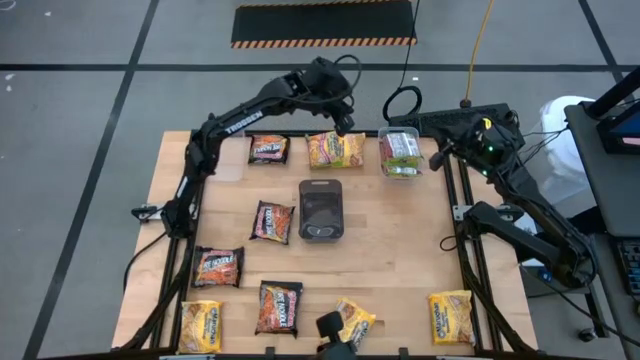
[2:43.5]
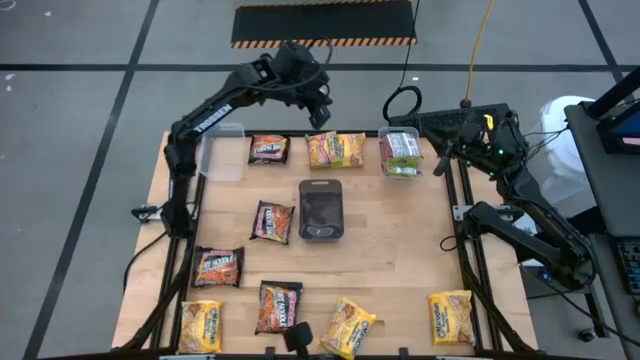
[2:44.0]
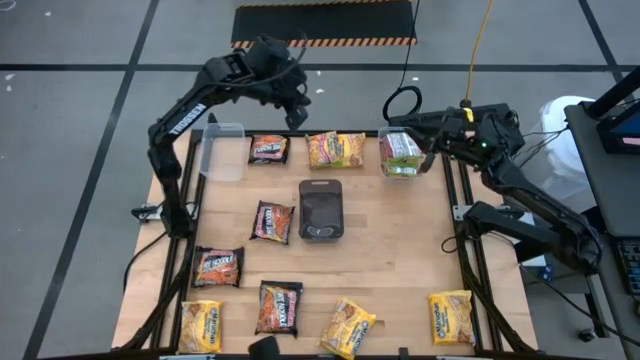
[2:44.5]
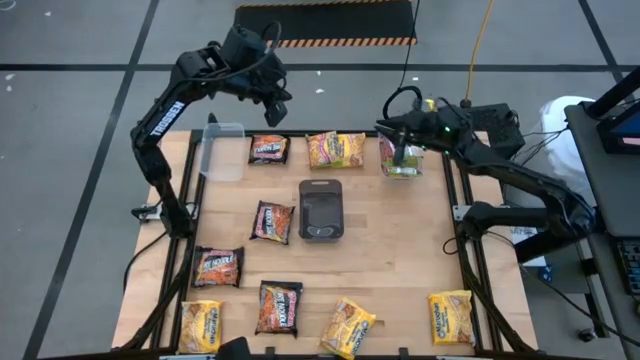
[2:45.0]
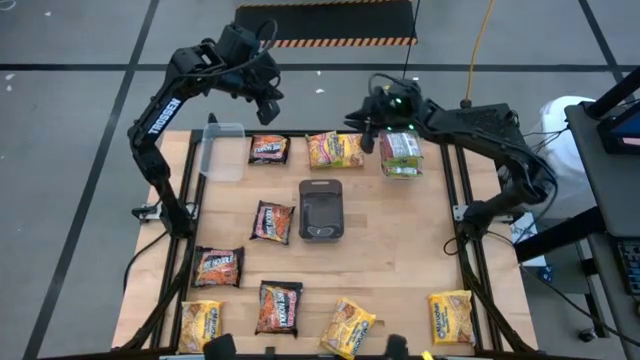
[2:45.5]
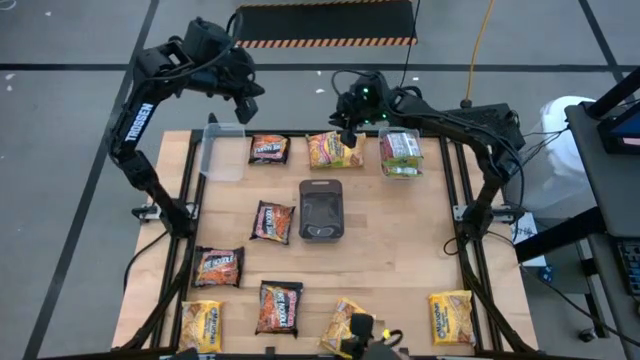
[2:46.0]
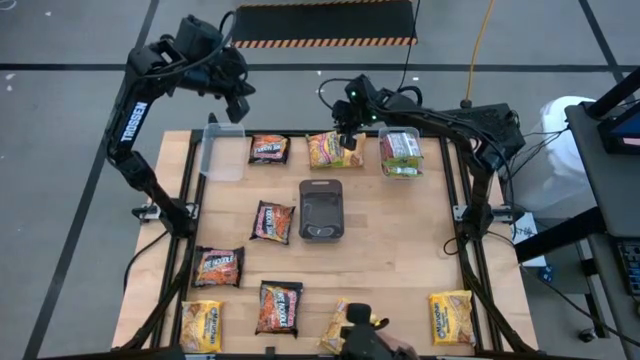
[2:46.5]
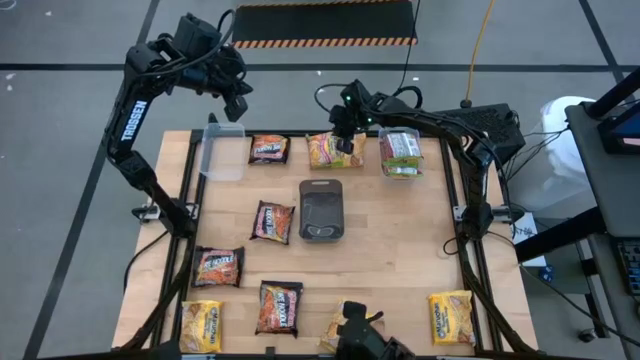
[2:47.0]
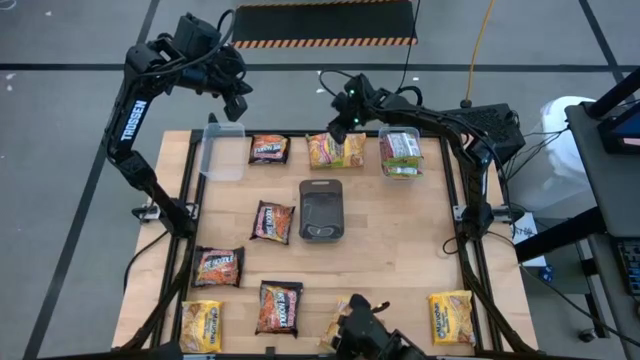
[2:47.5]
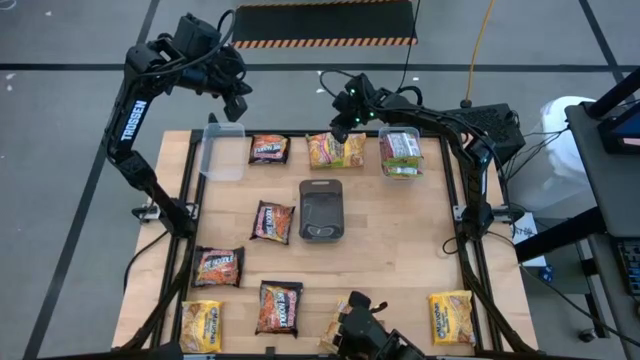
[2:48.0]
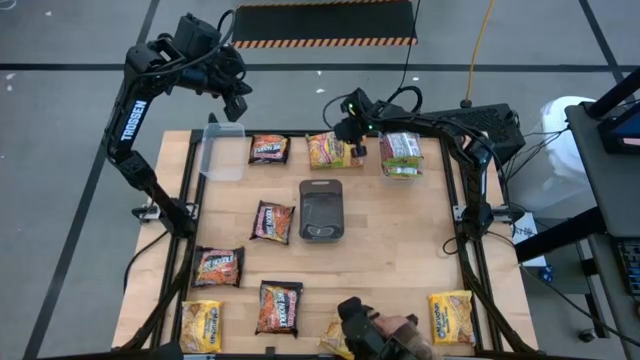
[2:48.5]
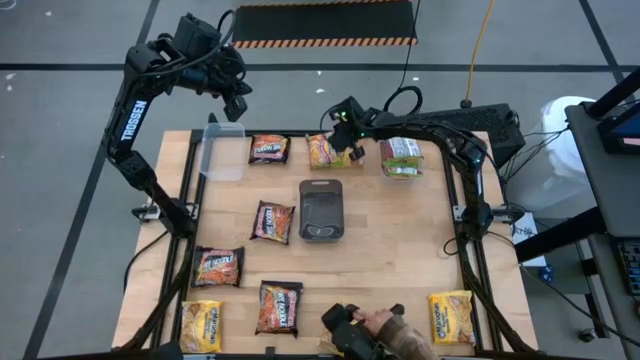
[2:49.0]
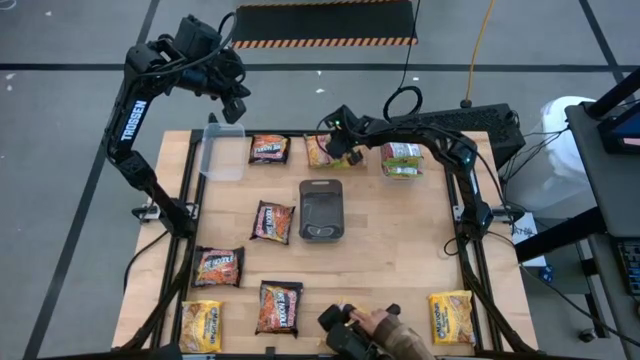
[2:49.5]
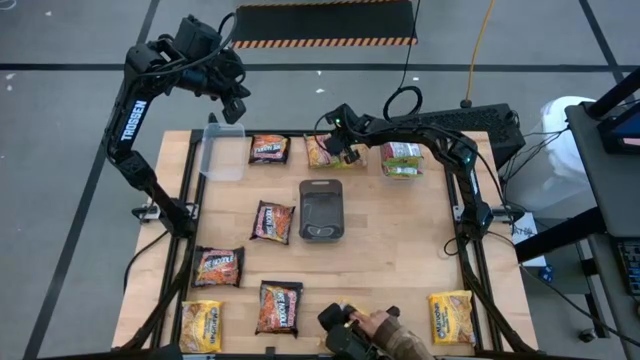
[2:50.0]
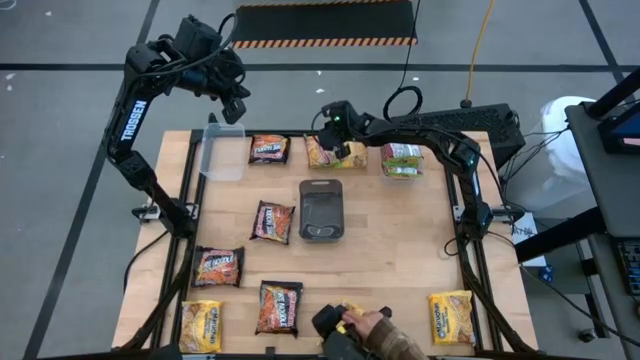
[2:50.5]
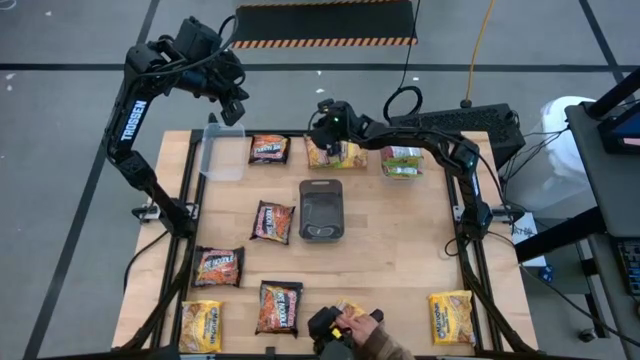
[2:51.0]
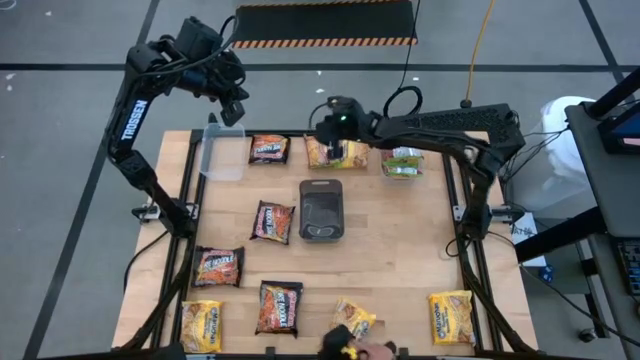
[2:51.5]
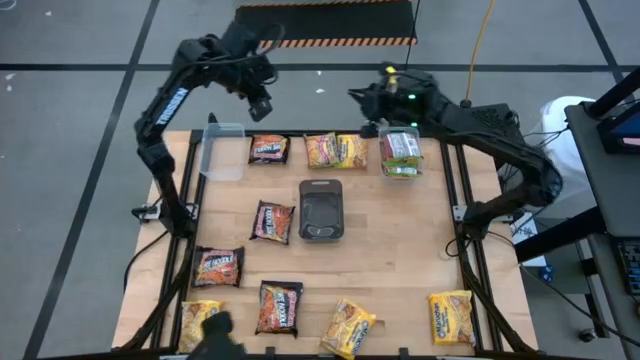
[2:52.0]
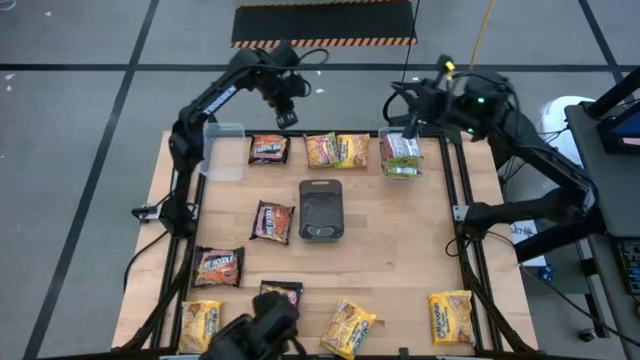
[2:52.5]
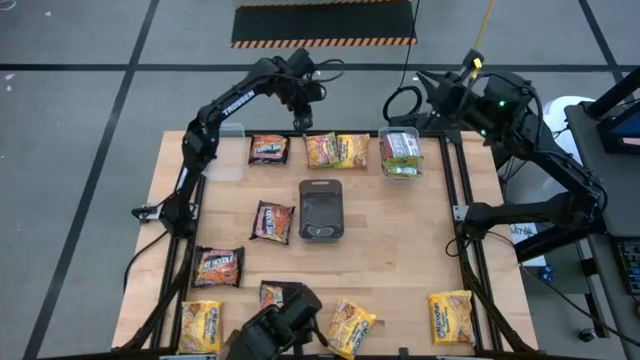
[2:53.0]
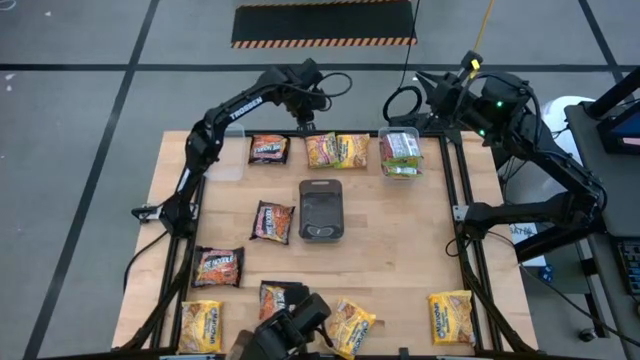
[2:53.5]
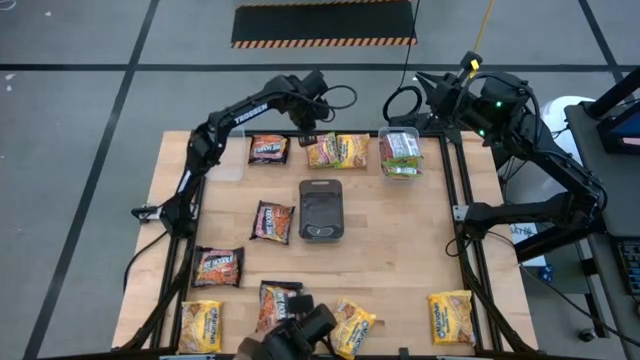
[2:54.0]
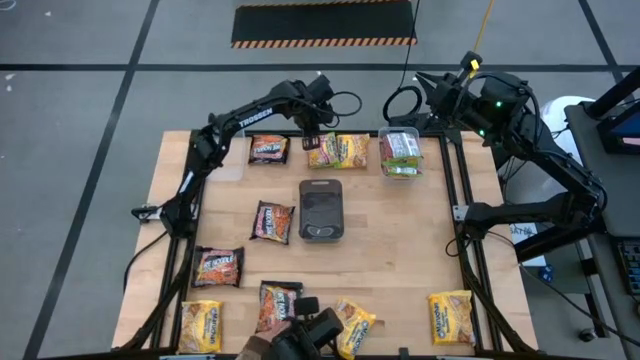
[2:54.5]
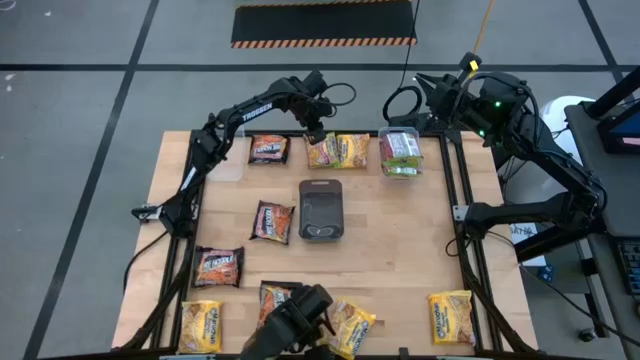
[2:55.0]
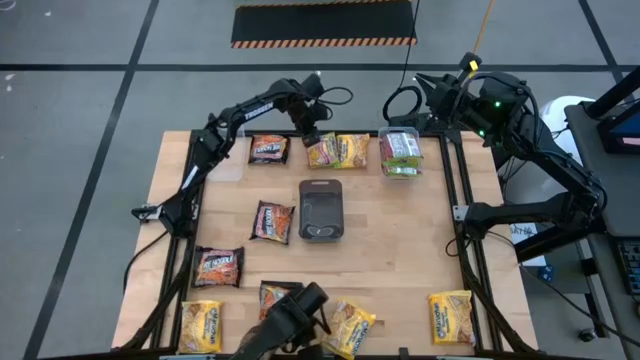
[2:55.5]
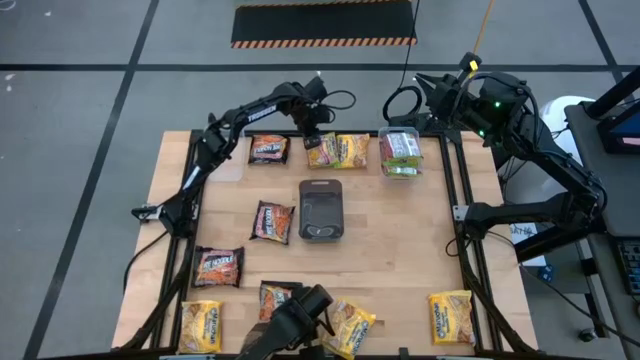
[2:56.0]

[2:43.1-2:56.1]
Task: Sort Maruchan noodles
Put the green noodle pack into the right transparent bin

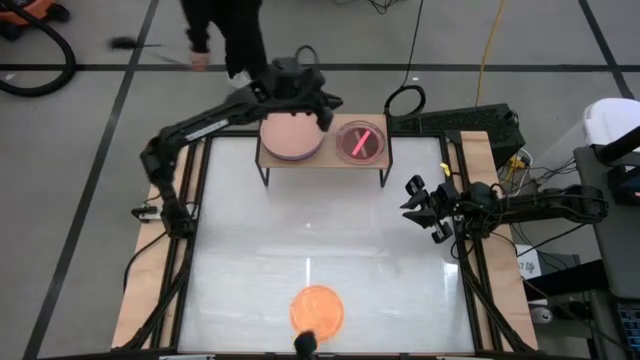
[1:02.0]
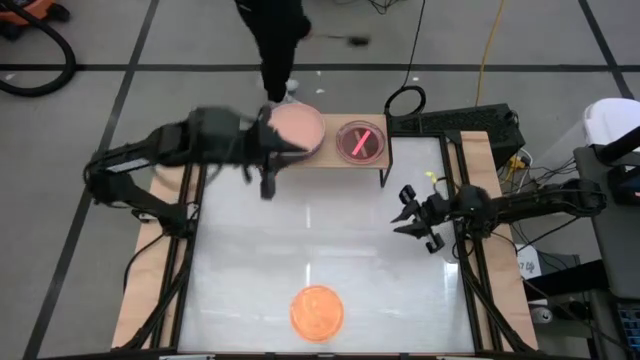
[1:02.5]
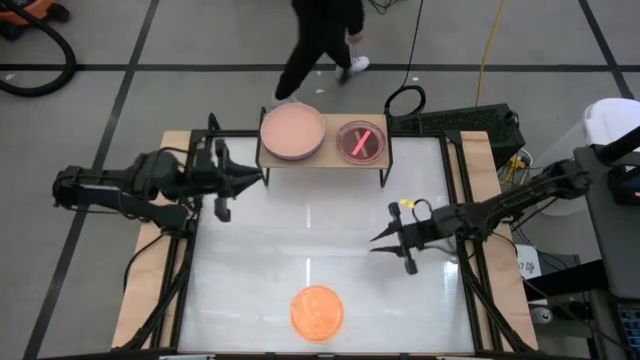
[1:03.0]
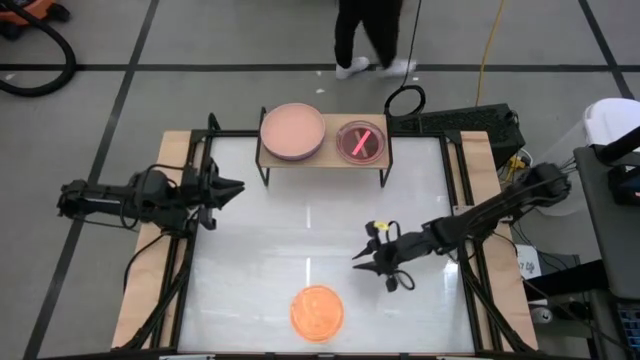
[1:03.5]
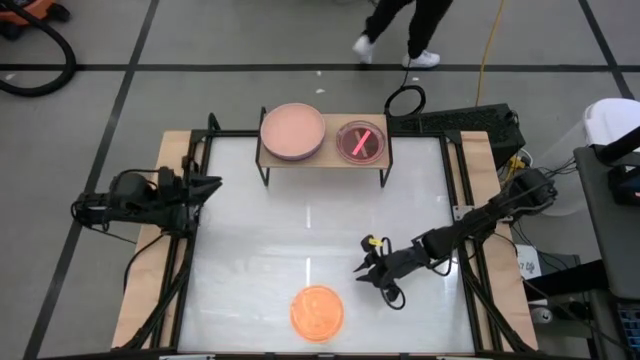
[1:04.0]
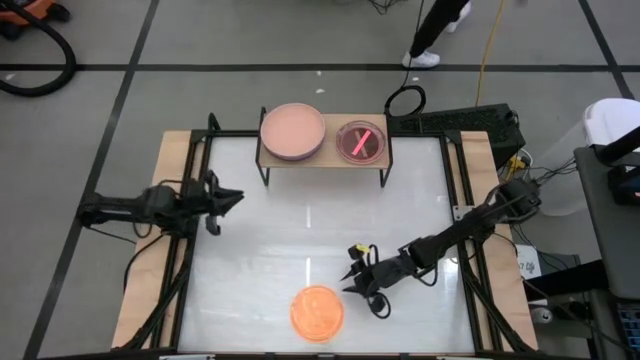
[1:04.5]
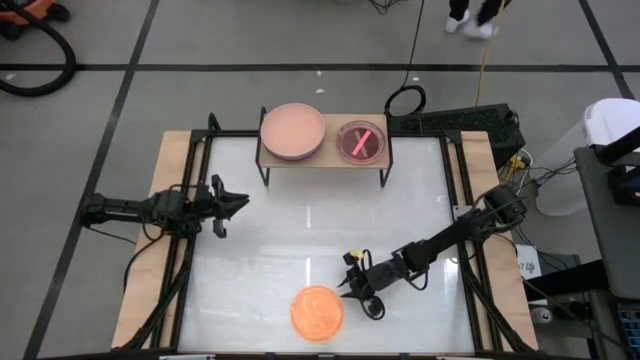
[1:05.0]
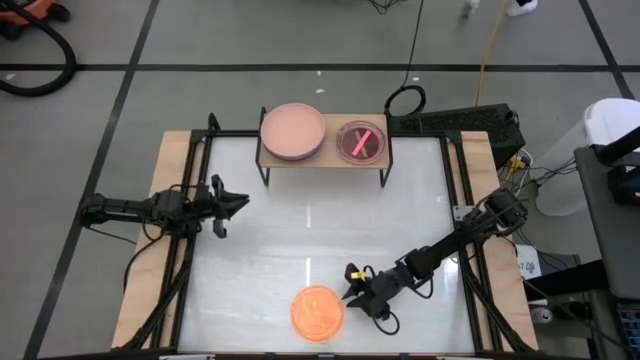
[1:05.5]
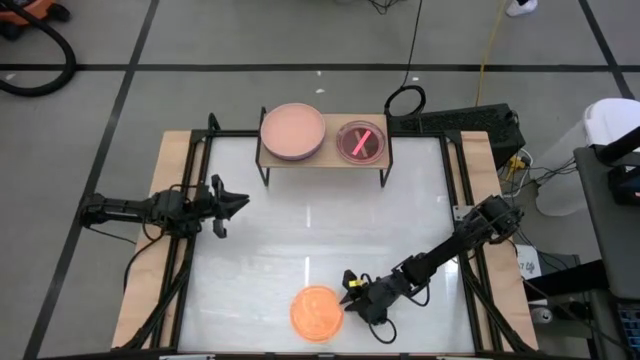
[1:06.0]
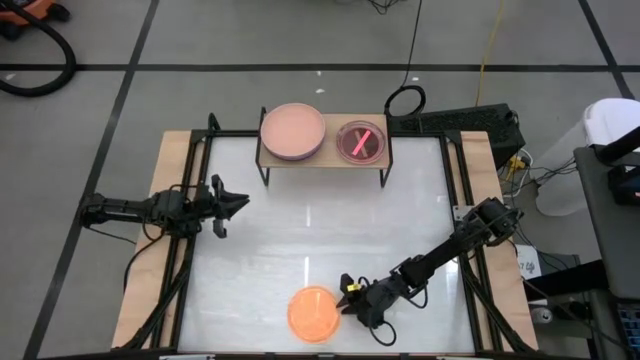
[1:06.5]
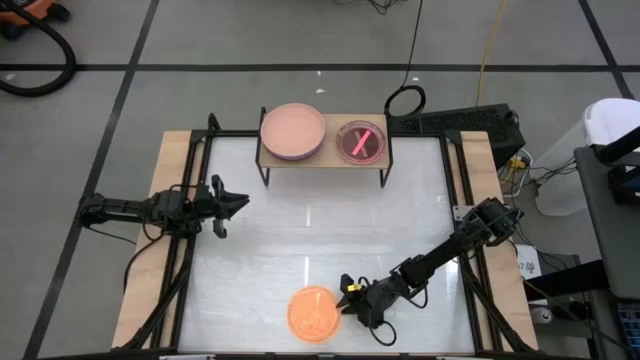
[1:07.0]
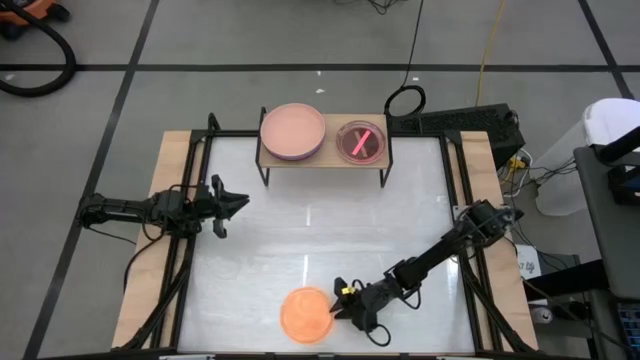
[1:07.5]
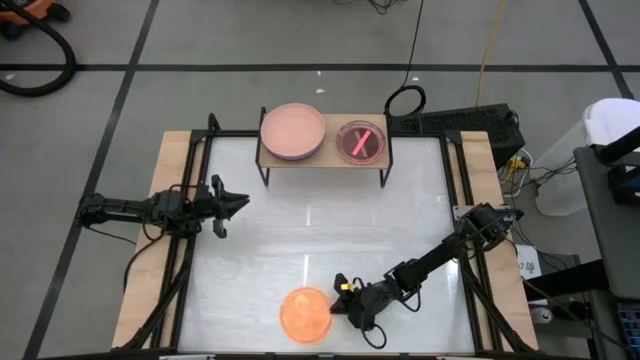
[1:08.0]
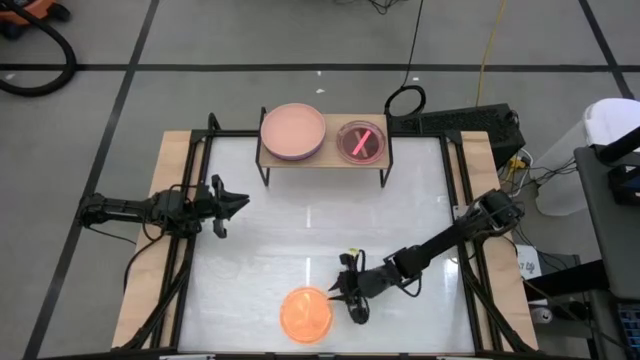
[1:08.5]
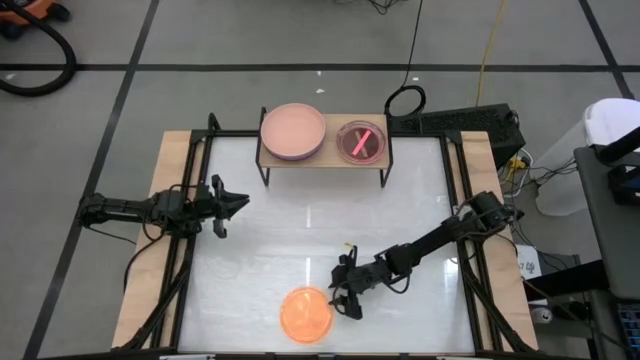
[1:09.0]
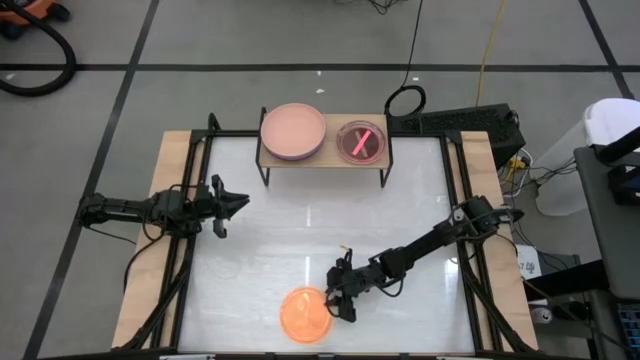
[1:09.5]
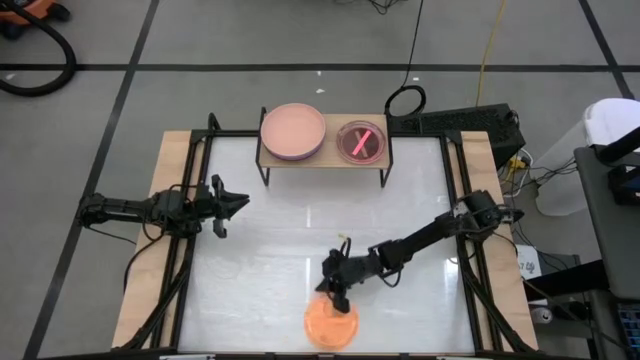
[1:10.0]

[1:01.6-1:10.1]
Task: Place and stack plates onto a shelf
Stack the transparent orange plate on top of the transparent pink plate on the shelf
